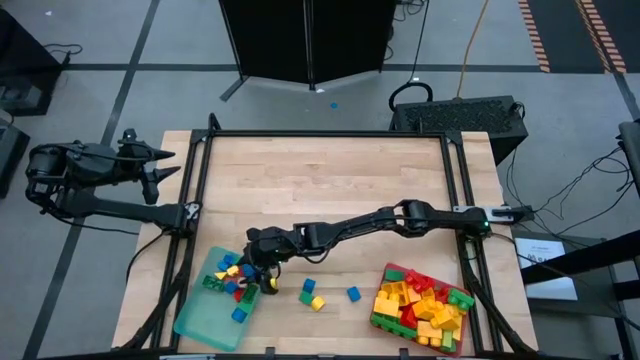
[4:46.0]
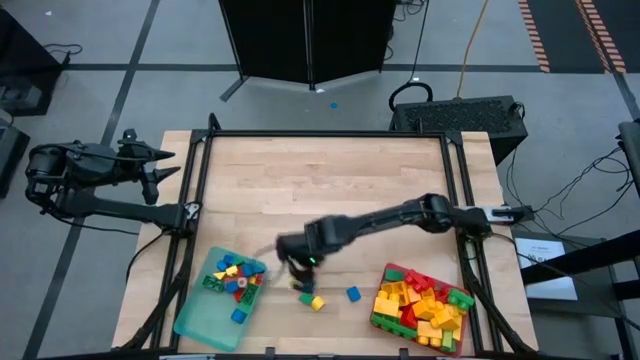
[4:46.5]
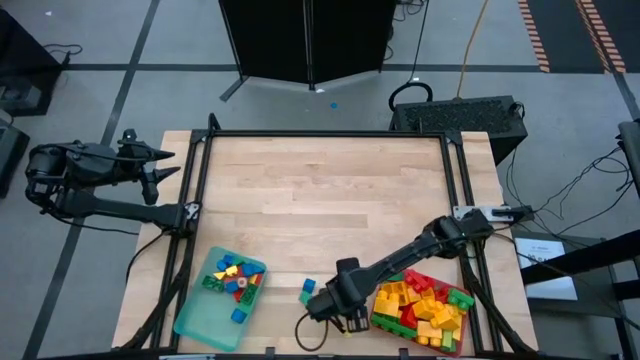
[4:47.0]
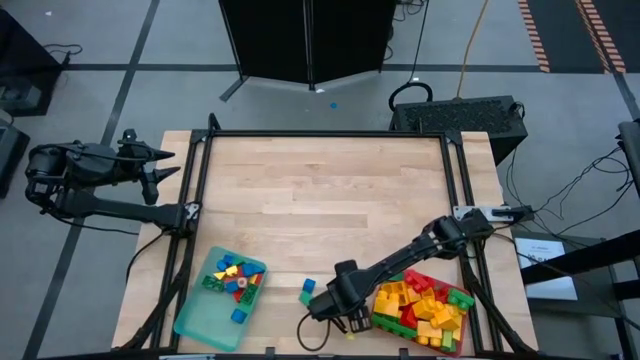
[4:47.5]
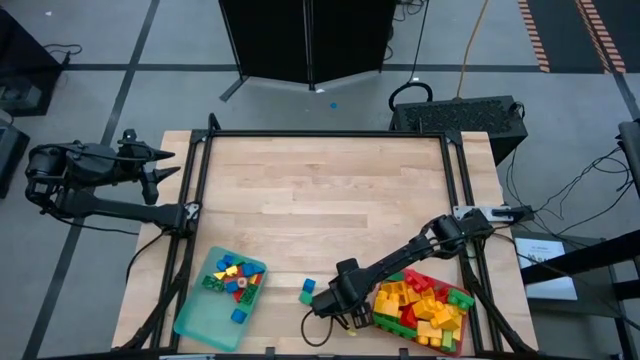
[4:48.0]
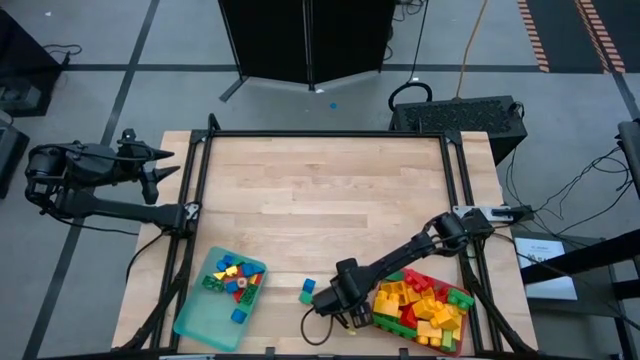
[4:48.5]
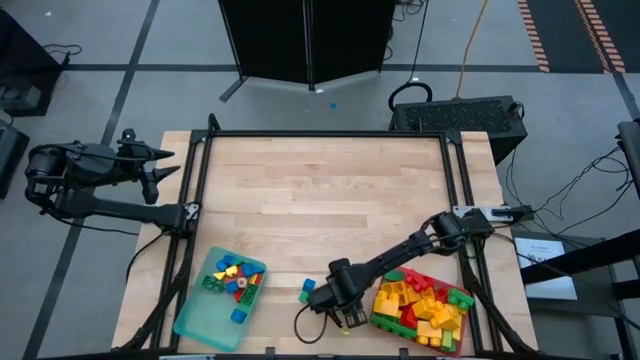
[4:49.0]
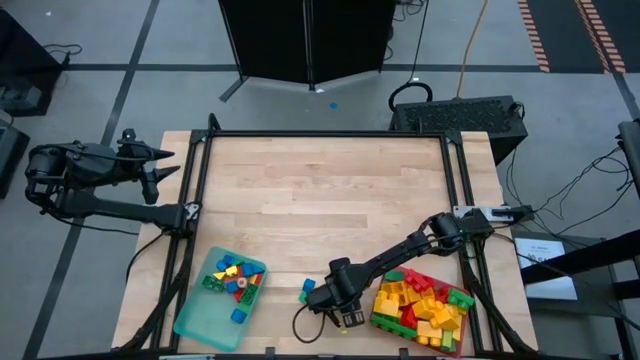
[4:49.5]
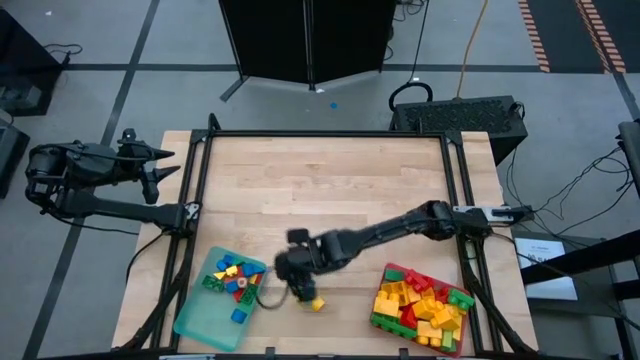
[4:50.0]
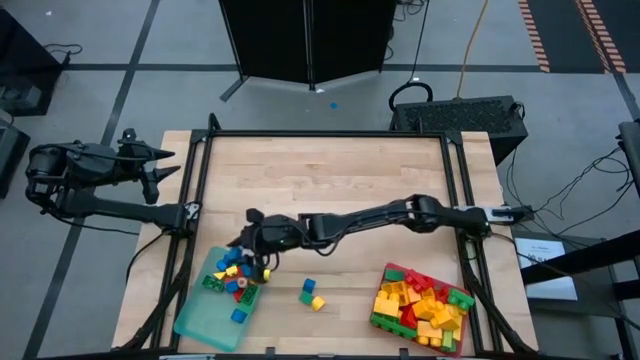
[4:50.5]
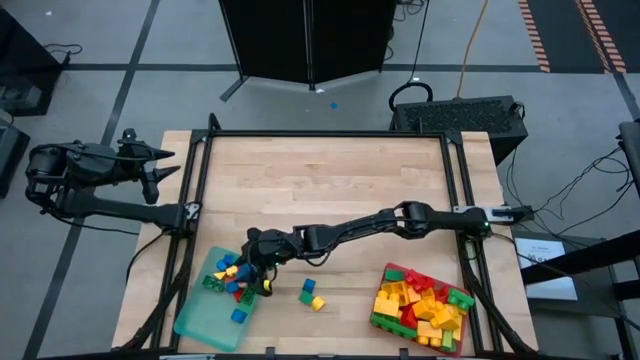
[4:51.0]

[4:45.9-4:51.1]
Task: Sort blocks by size
Put the blue block into the blue bin

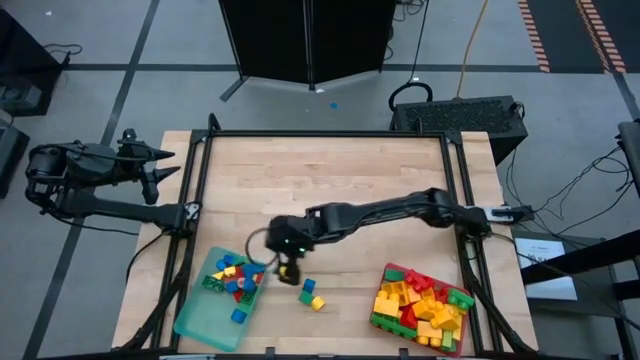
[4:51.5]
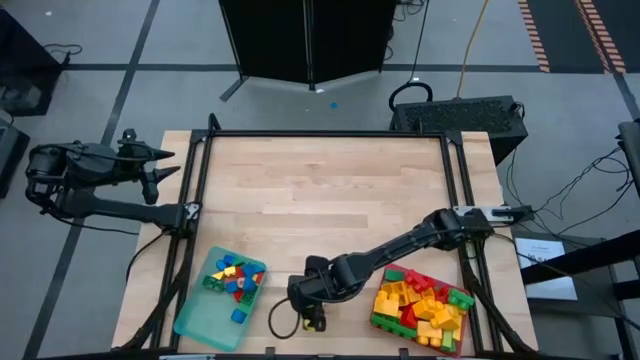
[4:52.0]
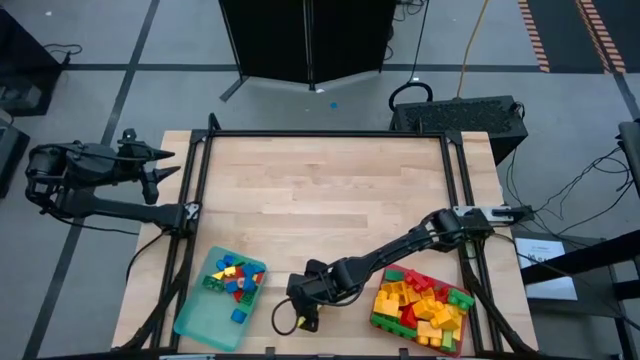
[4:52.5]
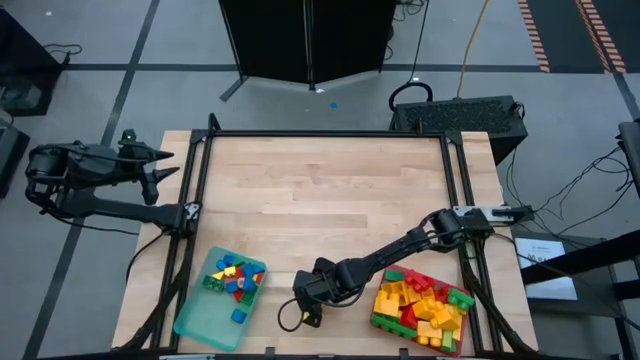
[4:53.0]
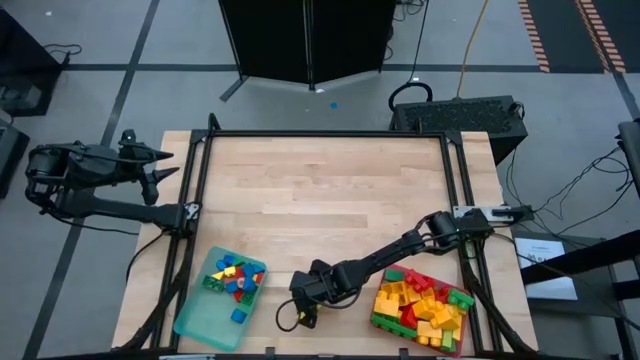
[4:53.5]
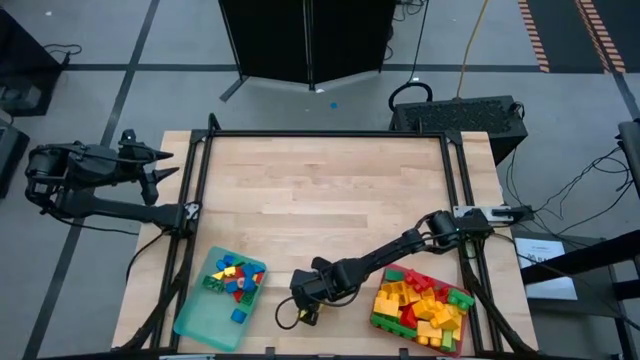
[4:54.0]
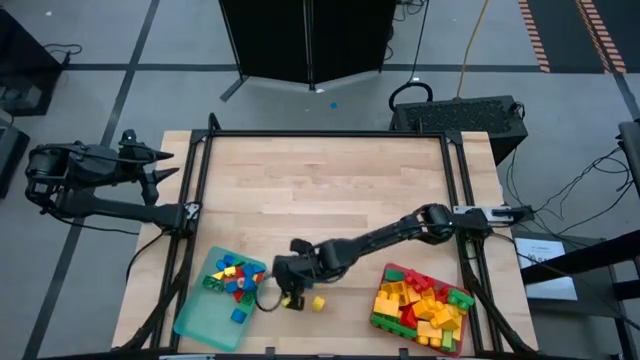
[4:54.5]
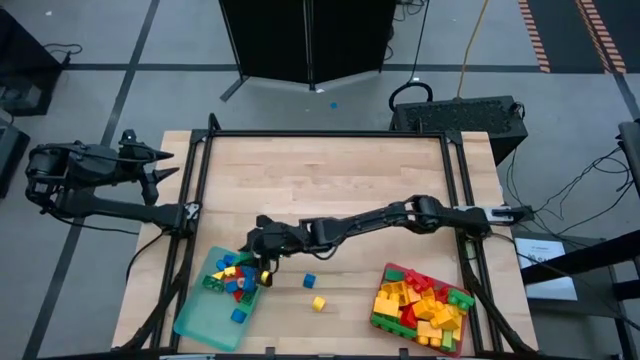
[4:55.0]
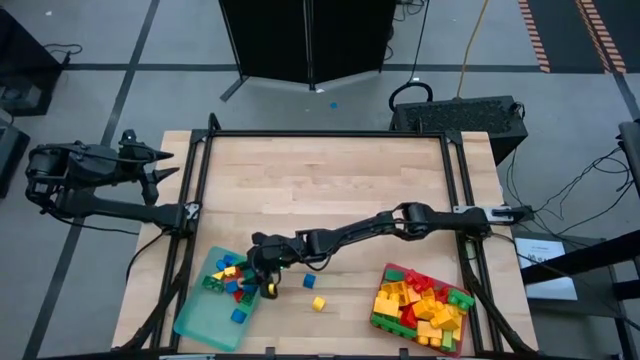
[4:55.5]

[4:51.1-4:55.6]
Put the green block into the blue bin

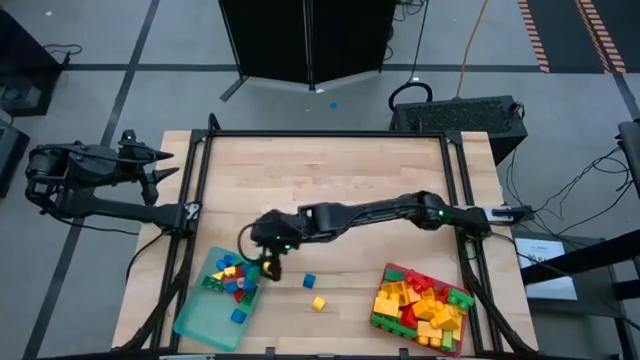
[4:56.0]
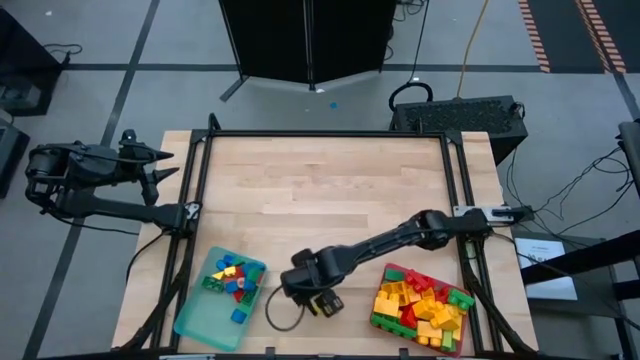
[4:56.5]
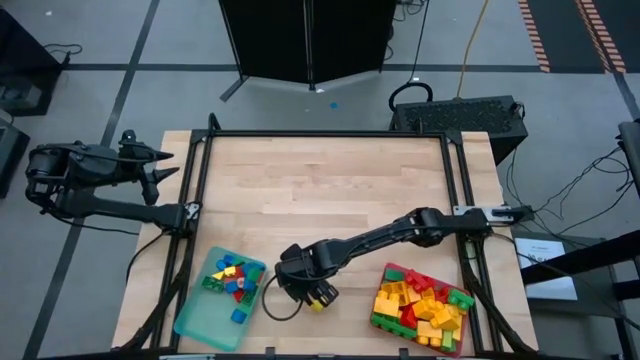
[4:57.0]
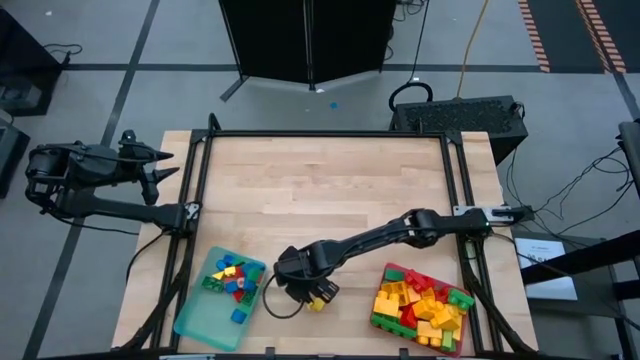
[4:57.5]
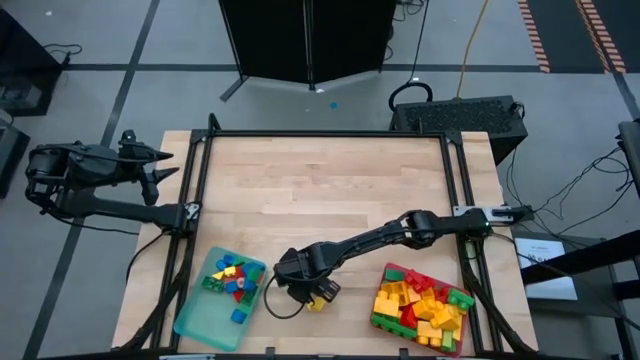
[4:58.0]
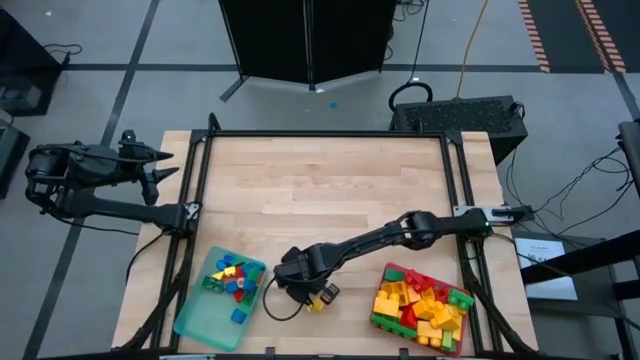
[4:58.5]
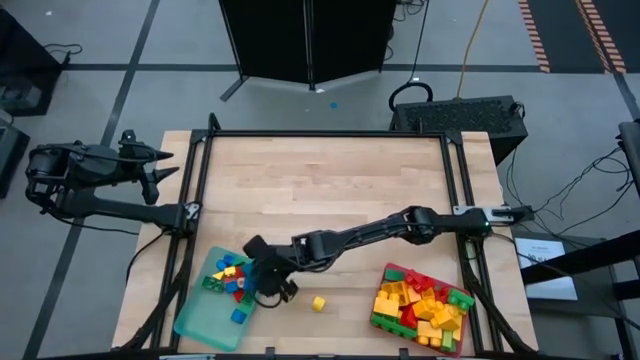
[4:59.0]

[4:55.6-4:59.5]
Put the blue block into the blue bin

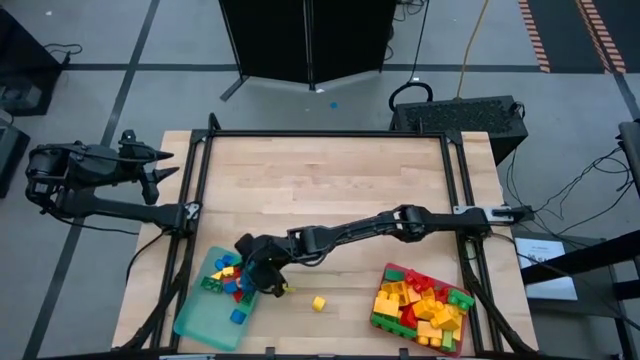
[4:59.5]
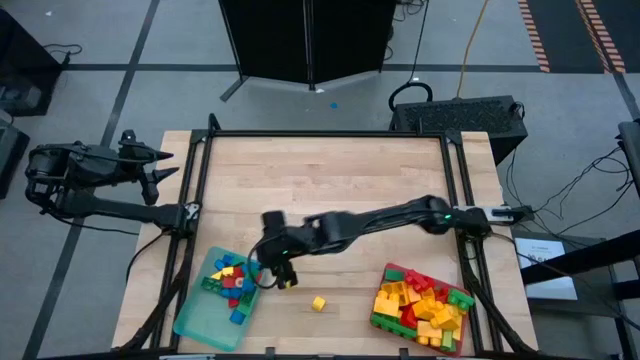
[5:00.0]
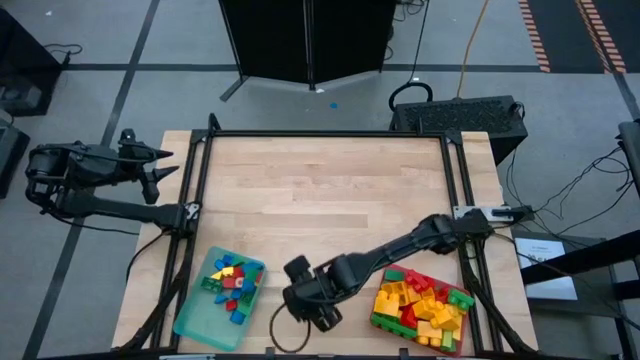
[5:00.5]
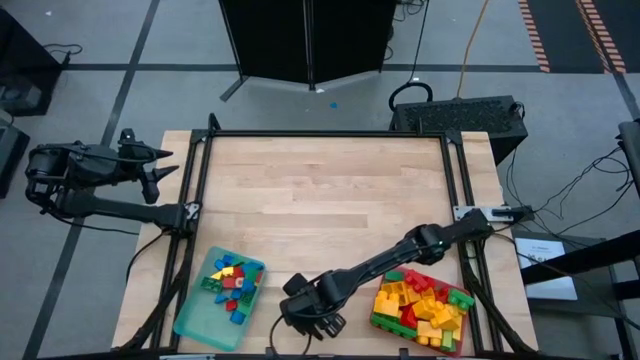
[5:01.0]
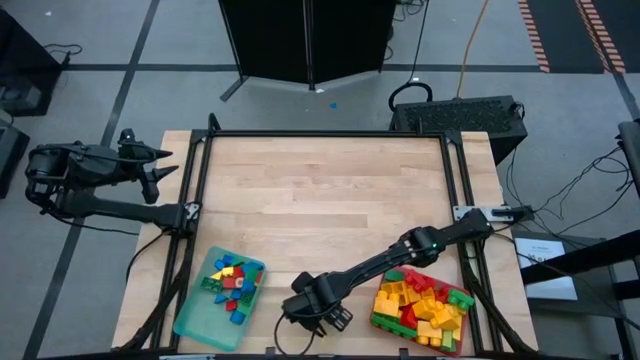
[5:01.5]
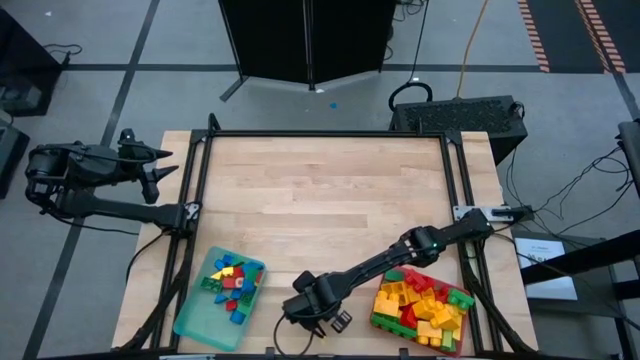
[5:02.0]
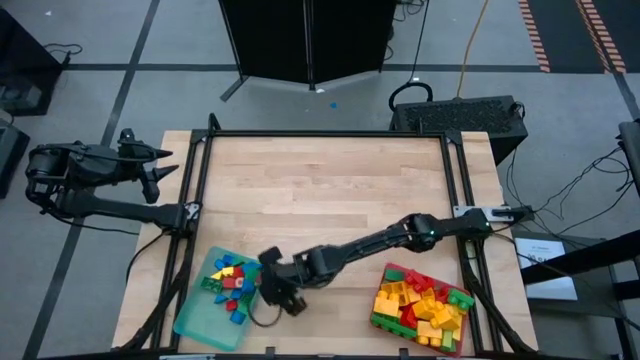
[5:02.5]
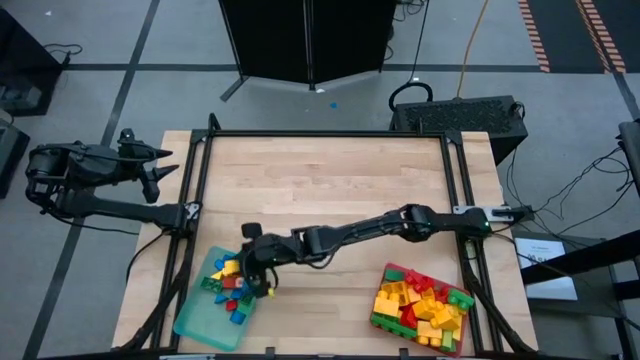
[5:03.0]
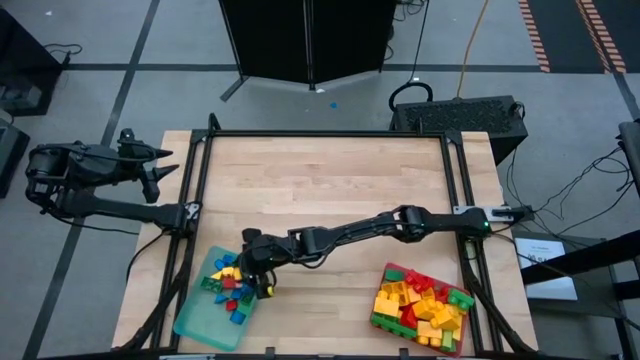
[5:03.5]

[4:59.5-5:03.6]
Put the yellow block into the blue bin

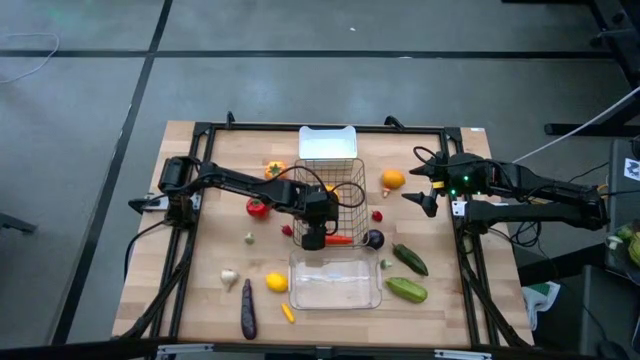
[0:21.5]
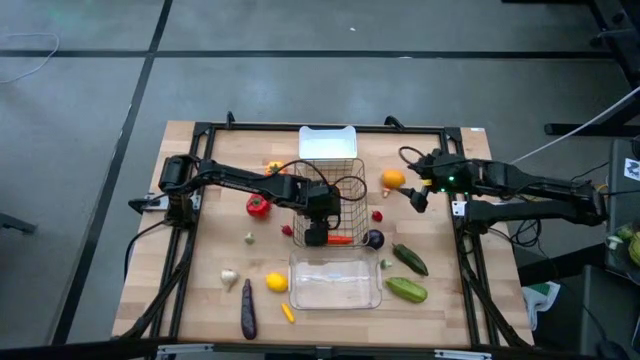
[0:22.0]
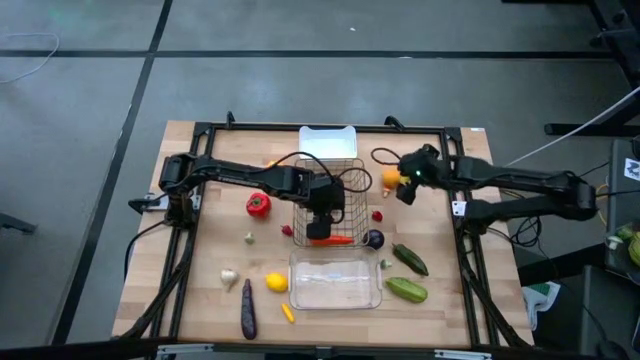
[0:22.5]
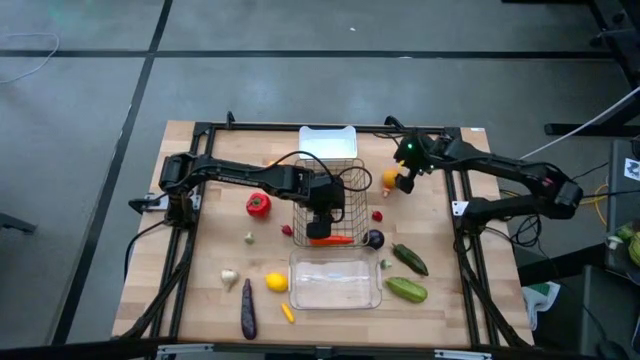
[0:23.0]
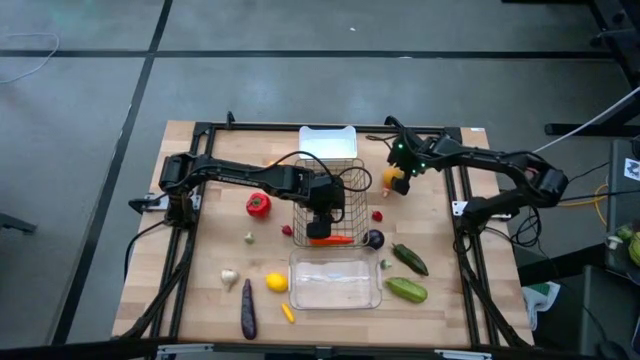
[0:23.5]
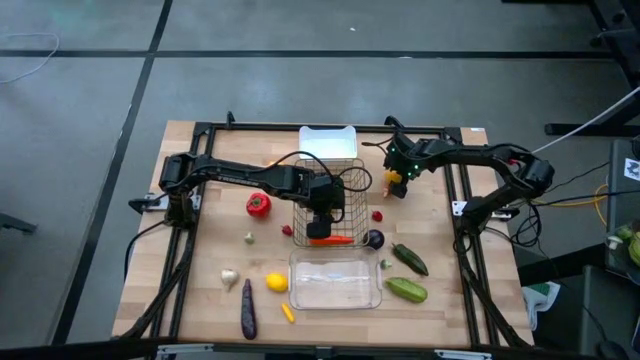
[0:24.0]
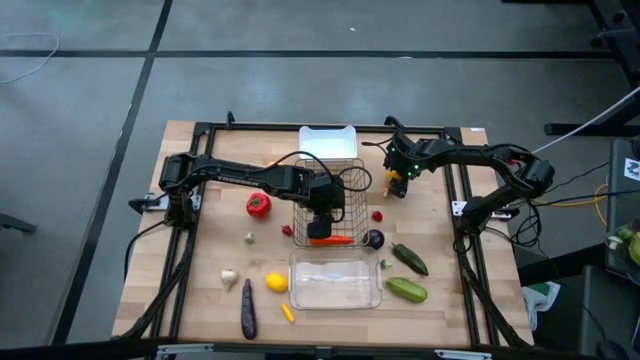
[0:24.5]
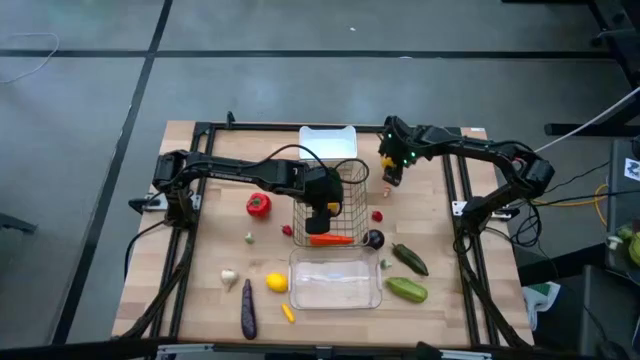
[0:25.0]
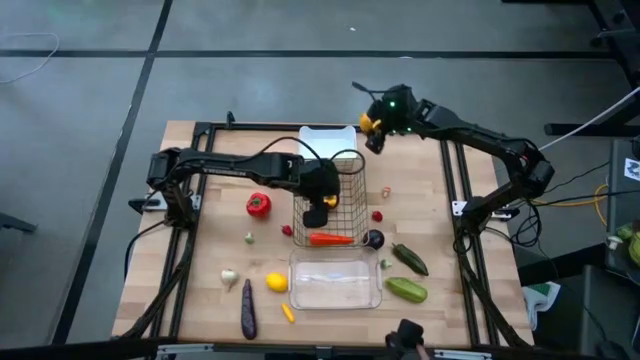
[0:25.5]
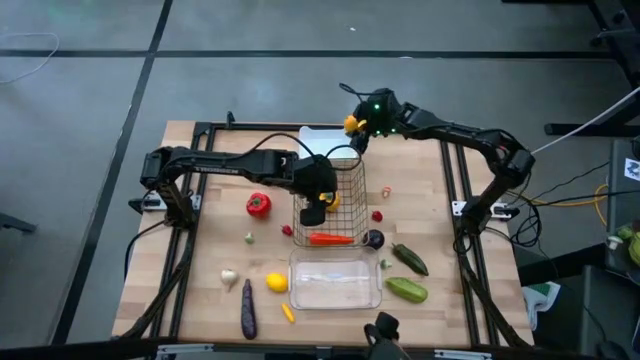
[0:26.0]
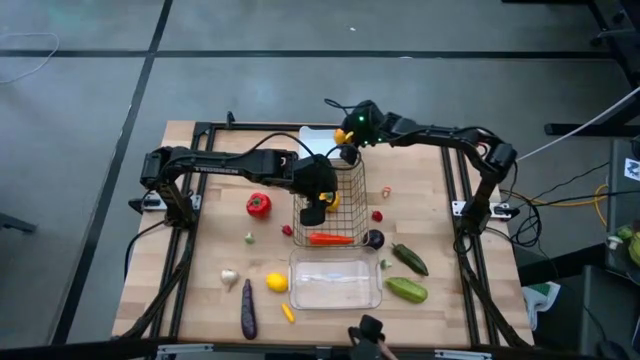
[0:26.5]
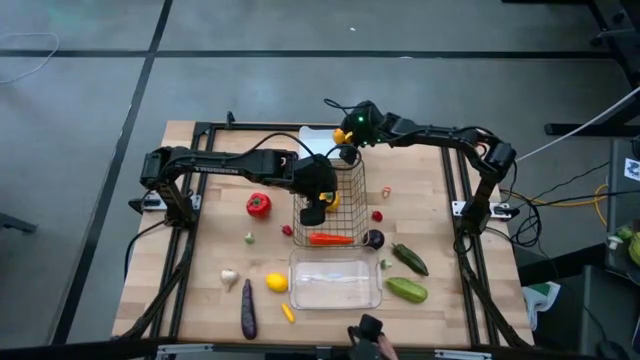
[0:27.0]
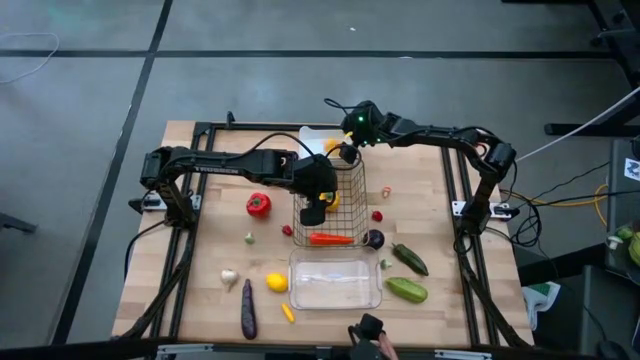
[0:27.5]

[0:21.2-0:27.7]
Task: Sort produce into baskets
Put the top lemon into the white bin
